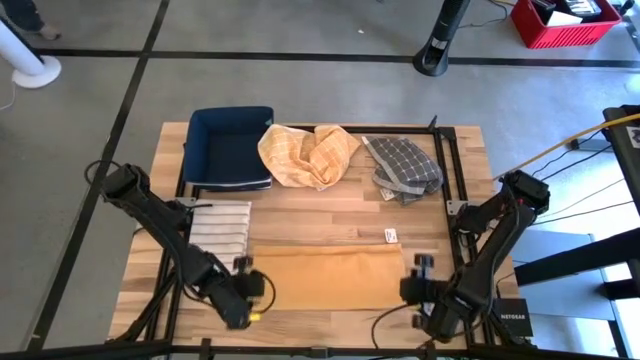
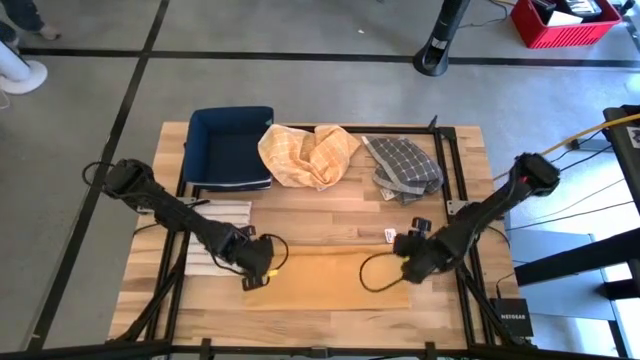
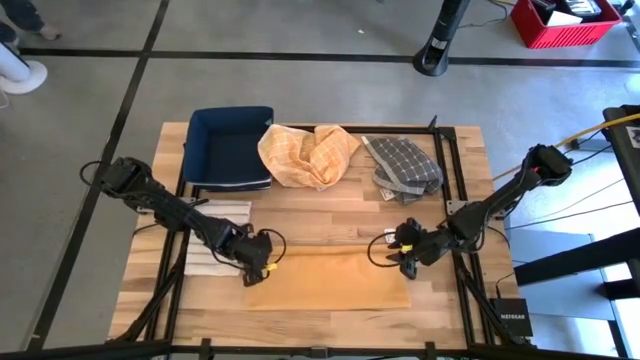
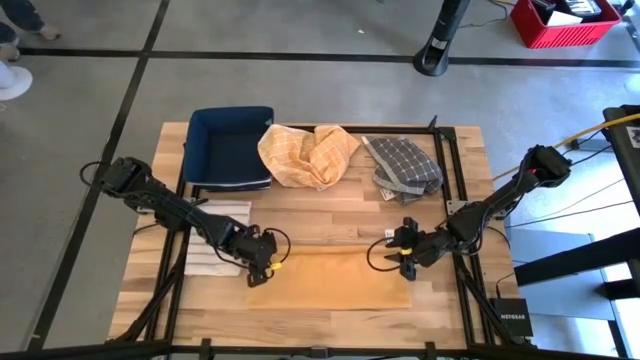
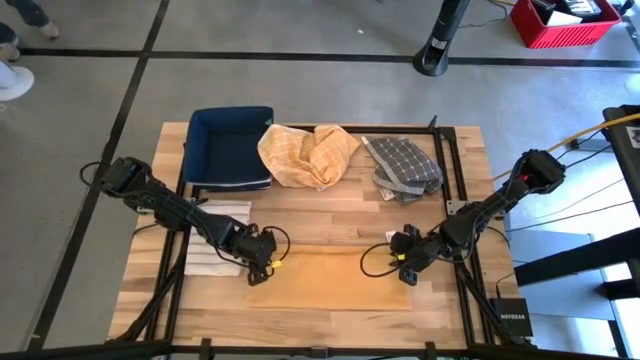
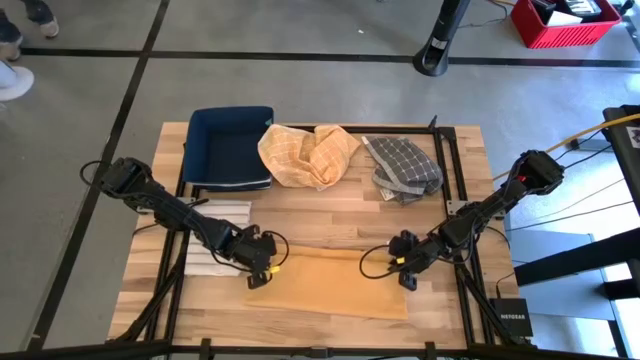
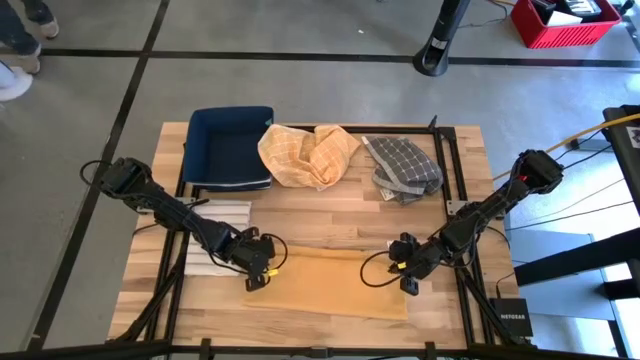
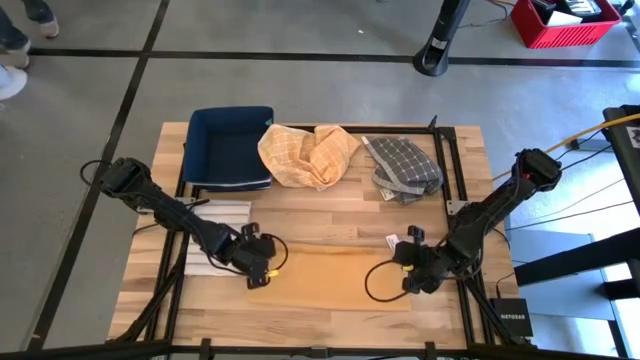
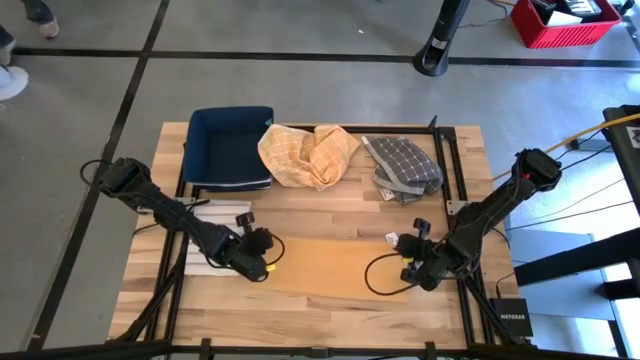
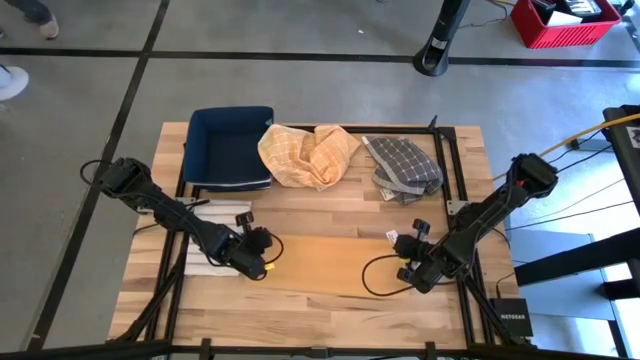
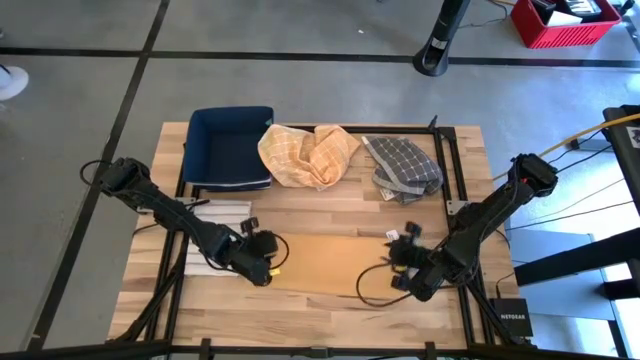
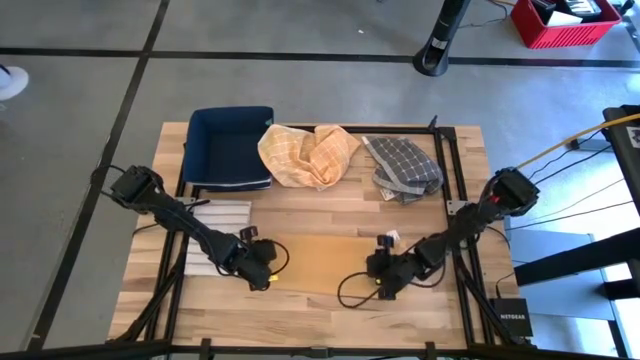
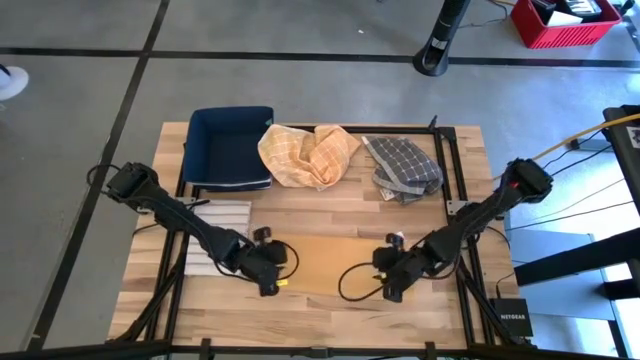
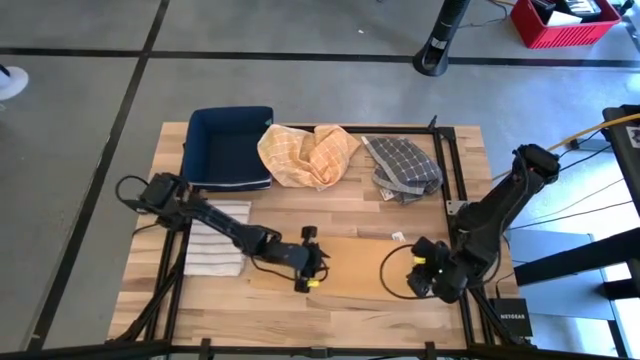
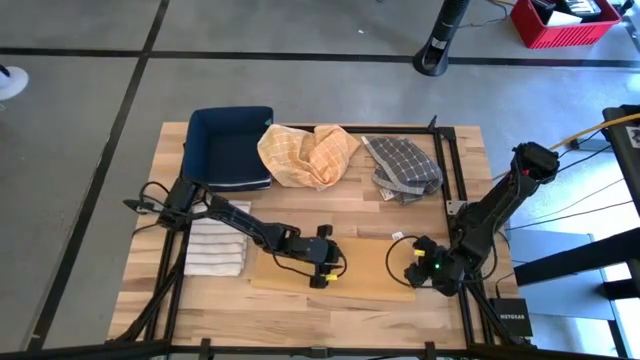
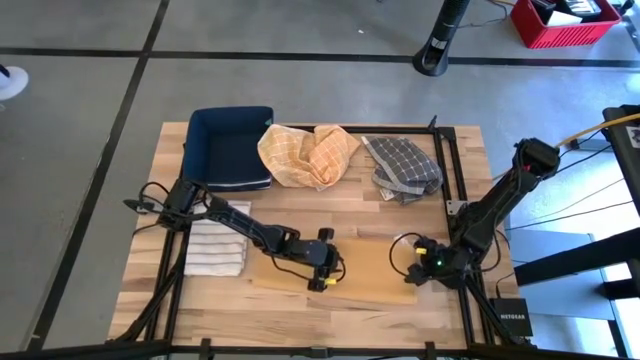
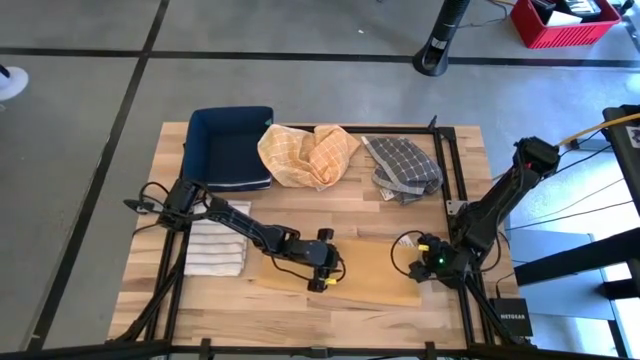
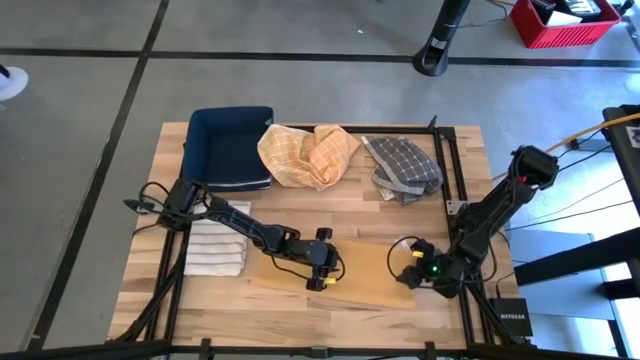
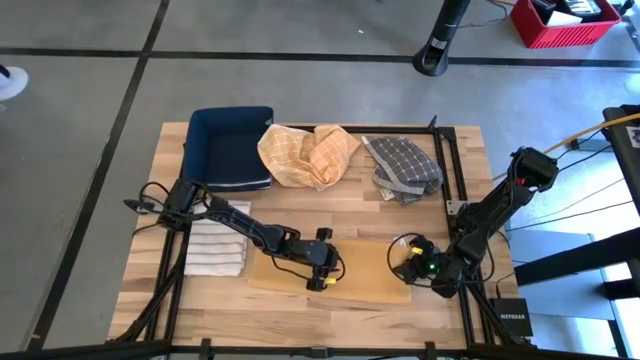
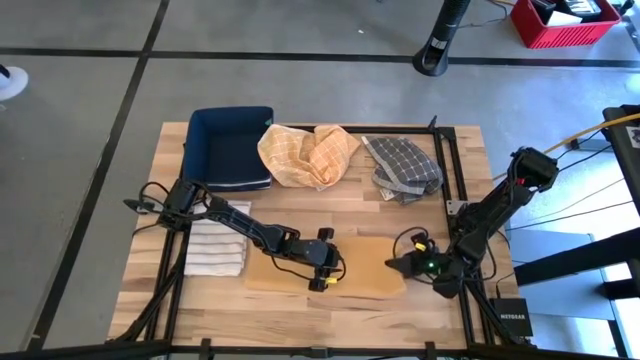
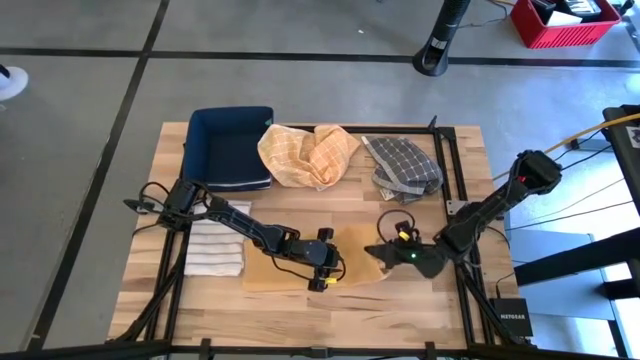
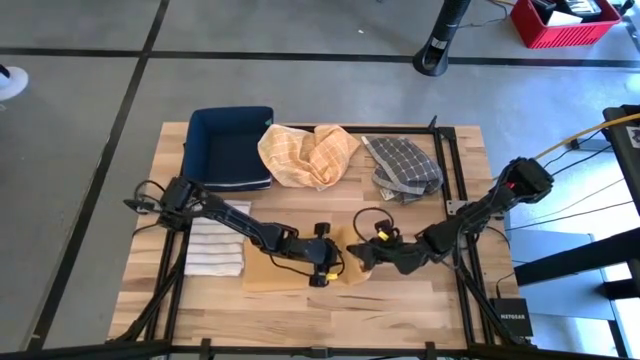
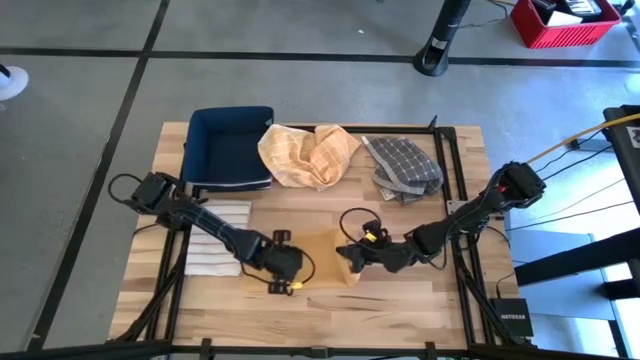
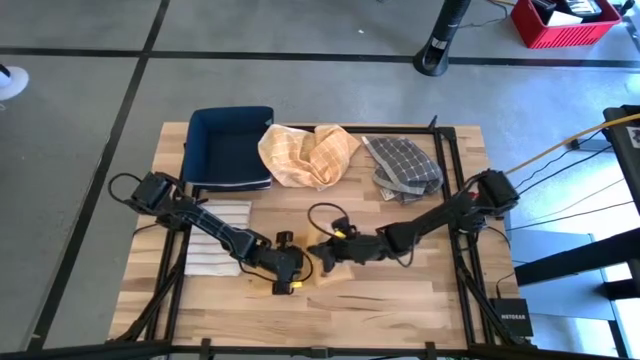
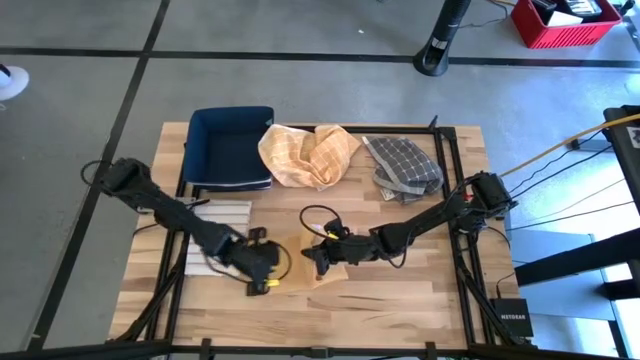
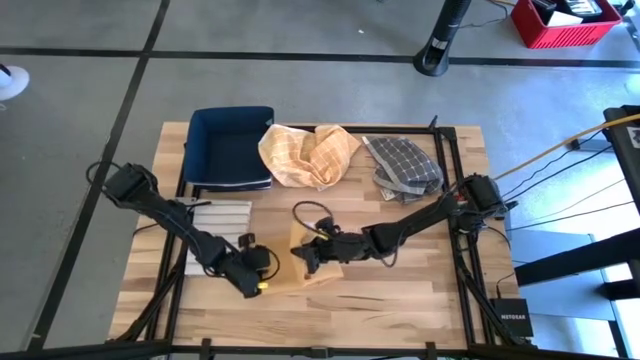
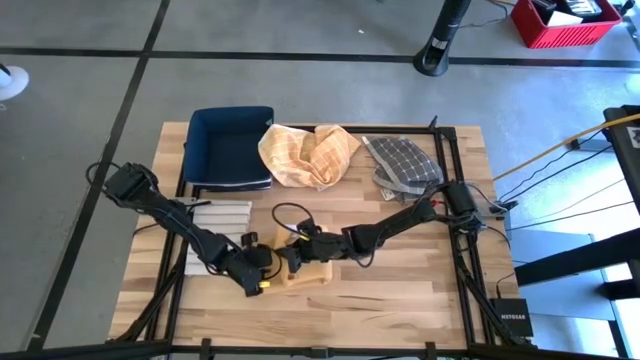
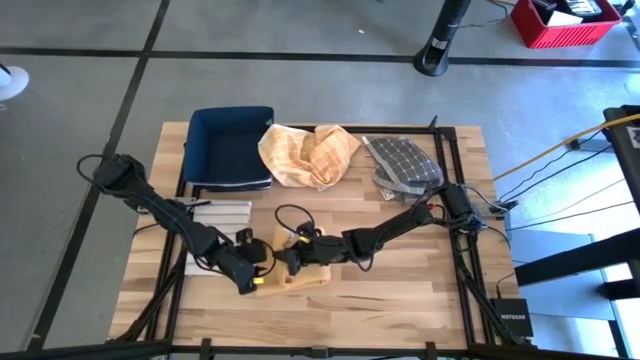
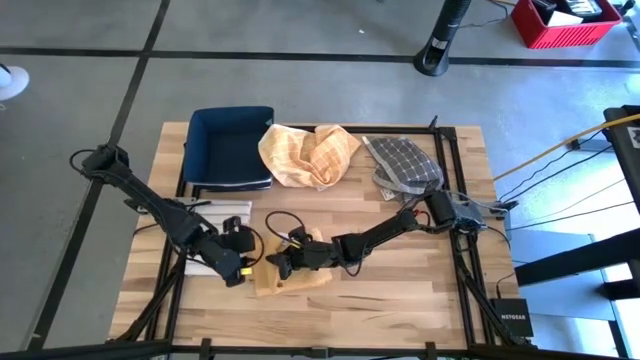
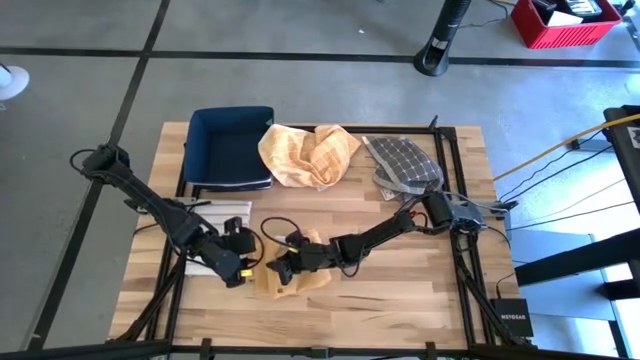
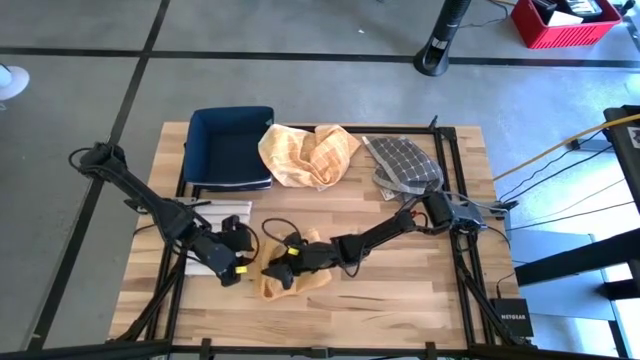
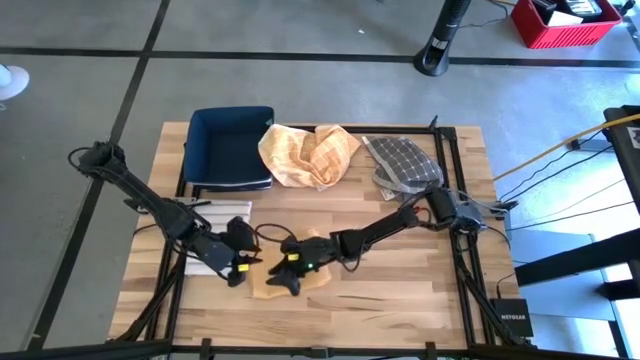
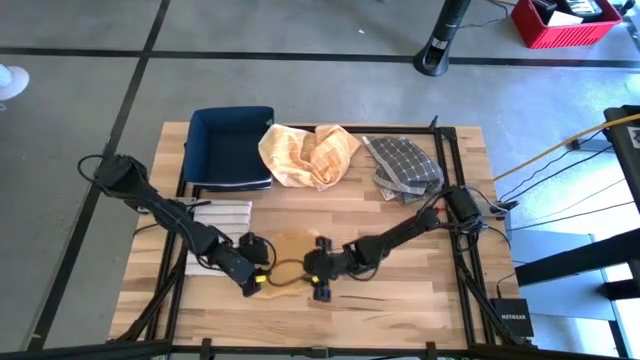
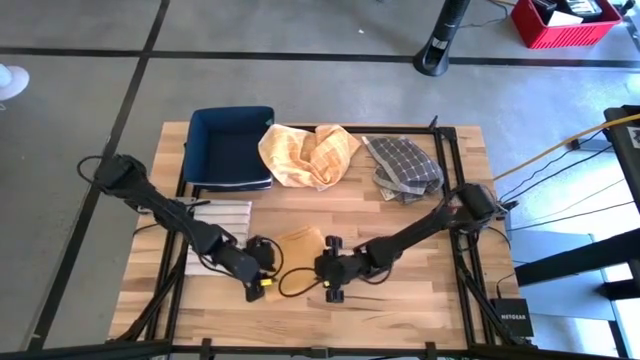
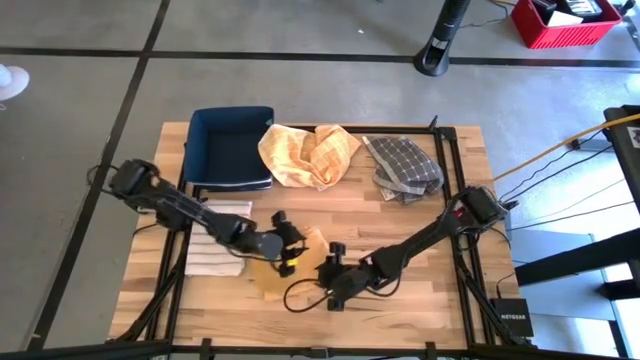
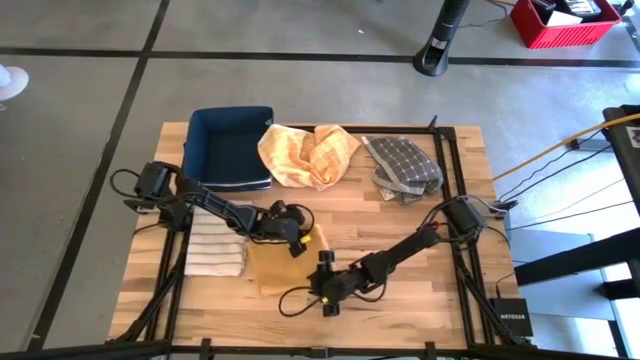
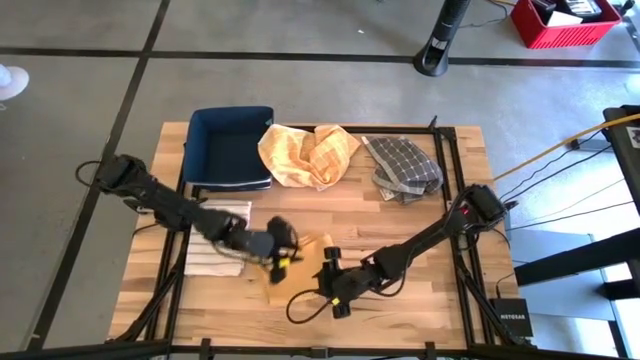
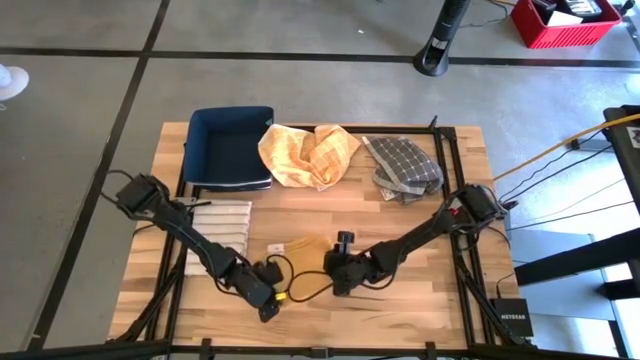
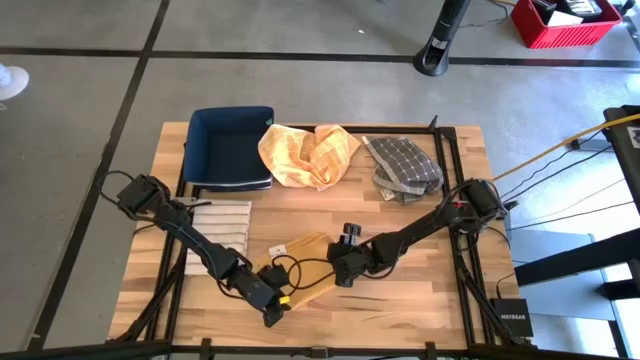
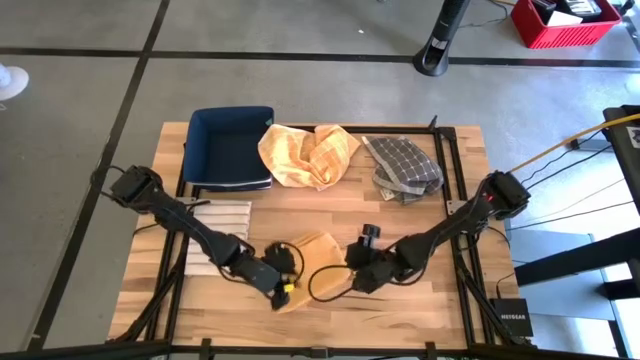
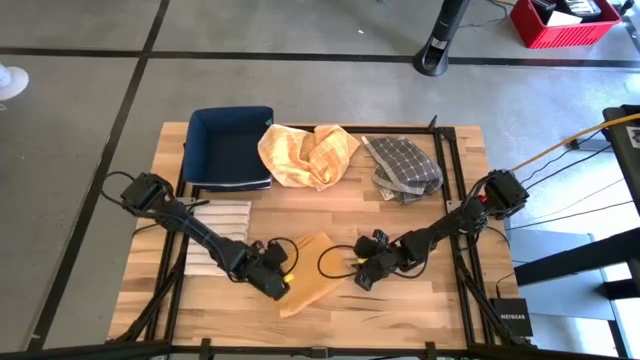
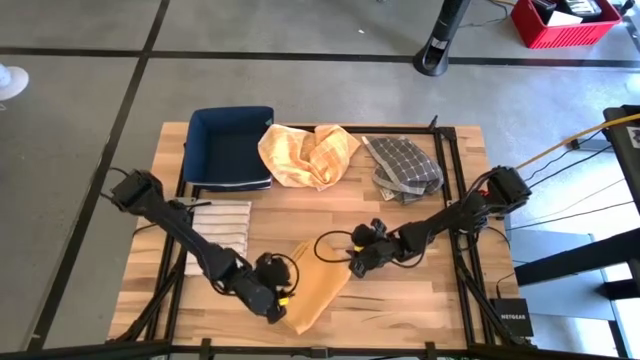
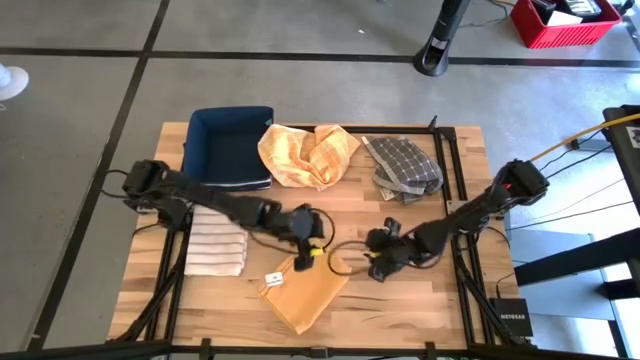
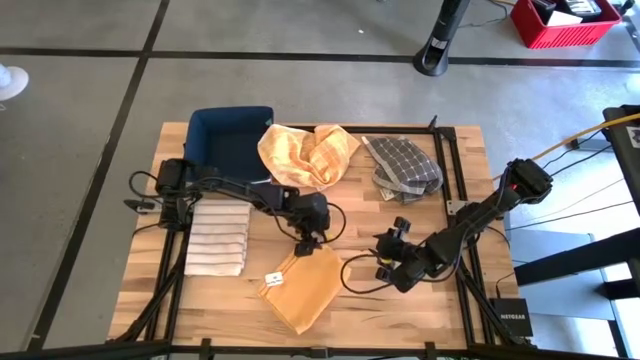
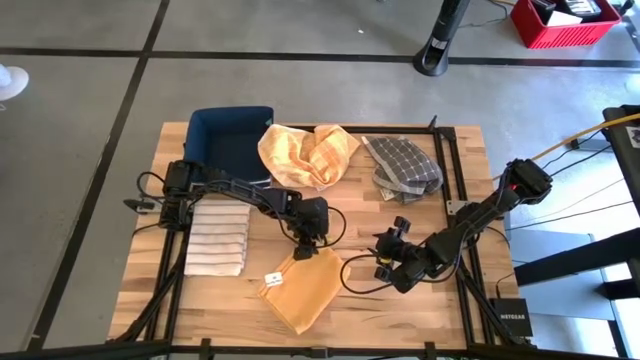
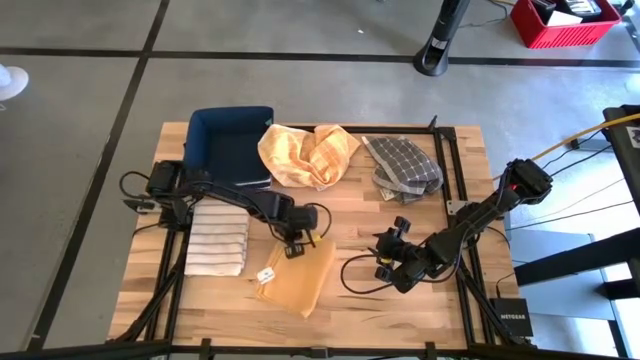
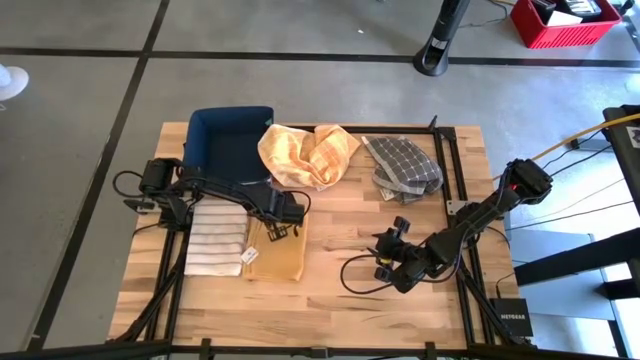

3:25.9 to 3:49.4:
Task: Fold towel
Fold the orange towel
